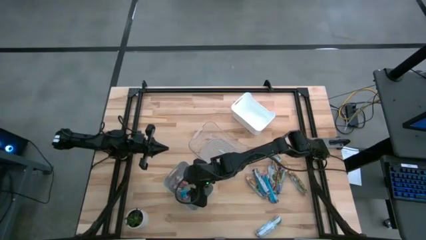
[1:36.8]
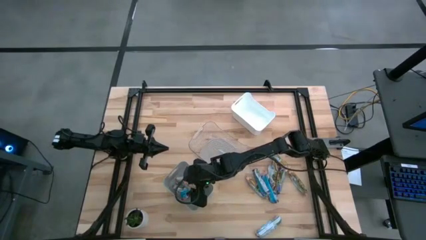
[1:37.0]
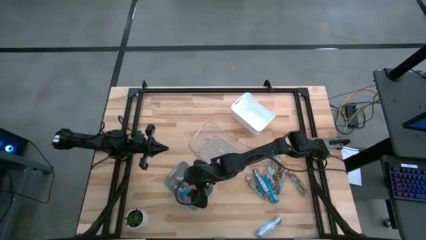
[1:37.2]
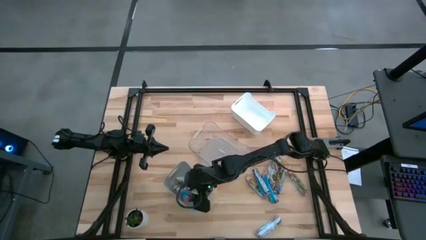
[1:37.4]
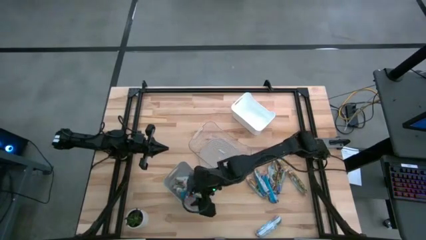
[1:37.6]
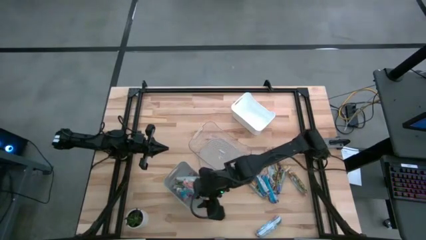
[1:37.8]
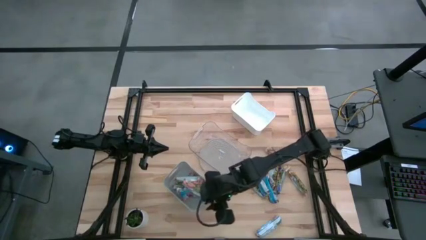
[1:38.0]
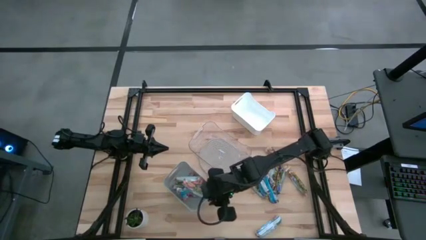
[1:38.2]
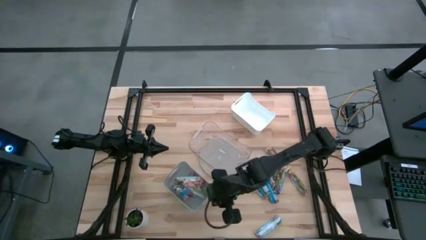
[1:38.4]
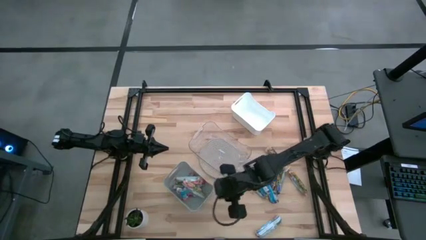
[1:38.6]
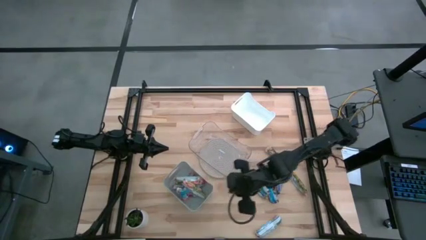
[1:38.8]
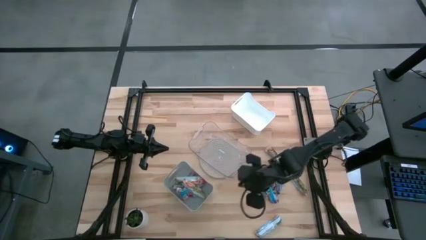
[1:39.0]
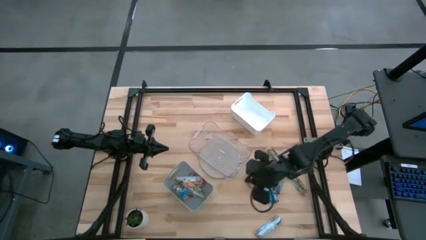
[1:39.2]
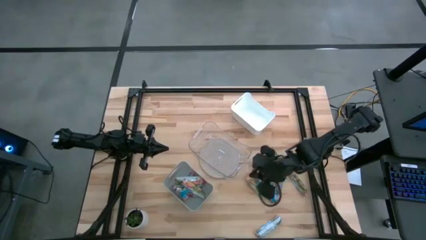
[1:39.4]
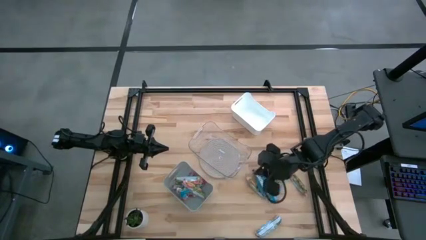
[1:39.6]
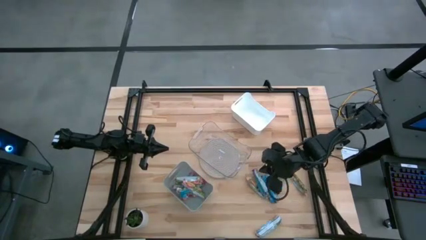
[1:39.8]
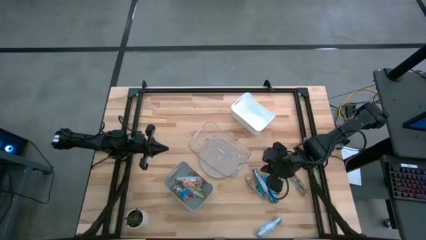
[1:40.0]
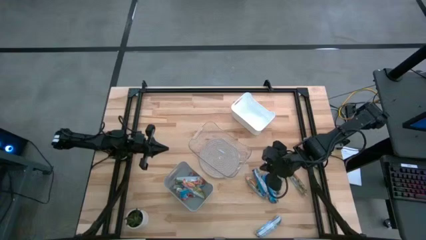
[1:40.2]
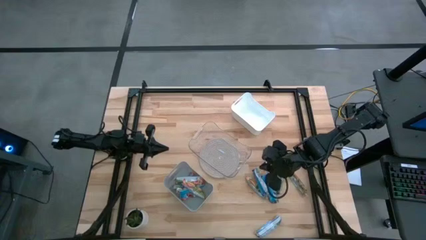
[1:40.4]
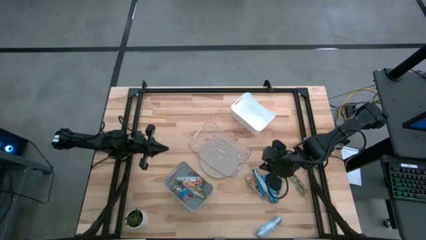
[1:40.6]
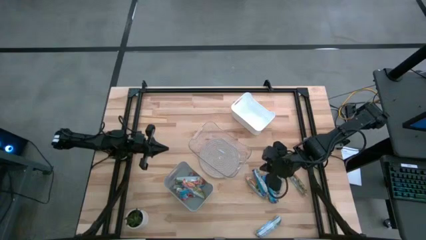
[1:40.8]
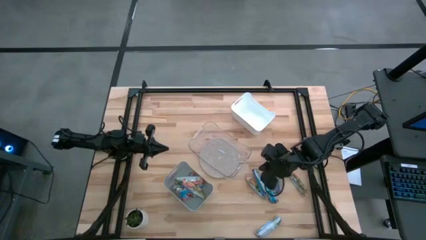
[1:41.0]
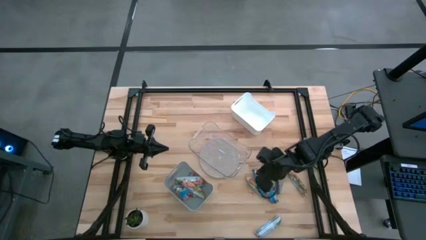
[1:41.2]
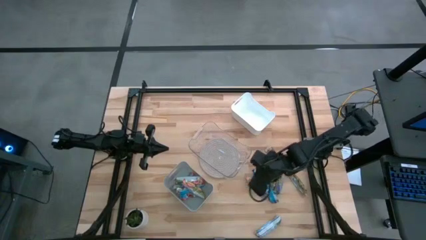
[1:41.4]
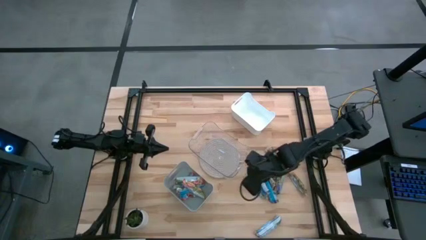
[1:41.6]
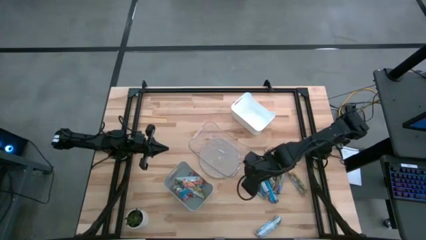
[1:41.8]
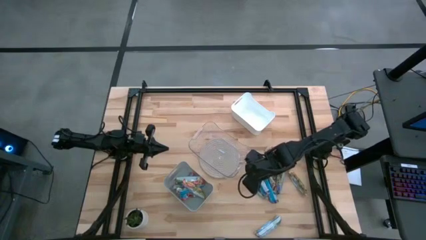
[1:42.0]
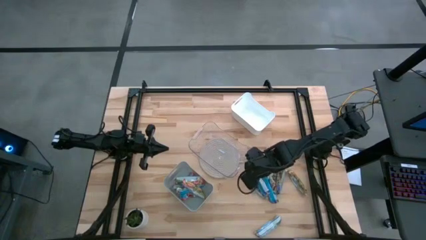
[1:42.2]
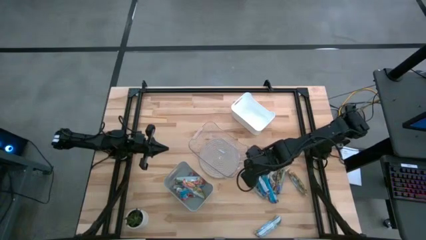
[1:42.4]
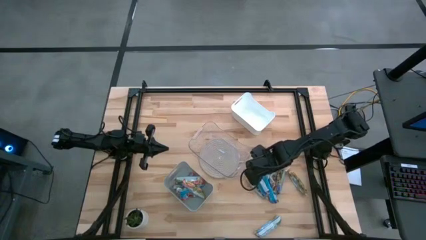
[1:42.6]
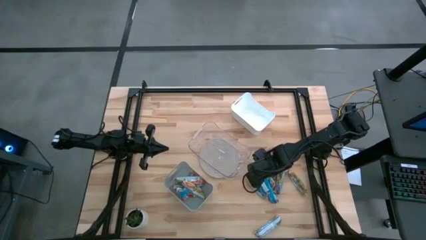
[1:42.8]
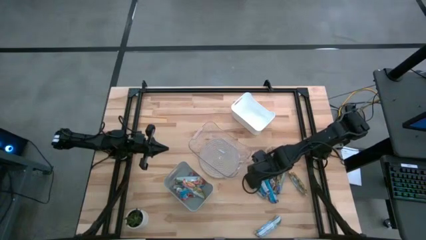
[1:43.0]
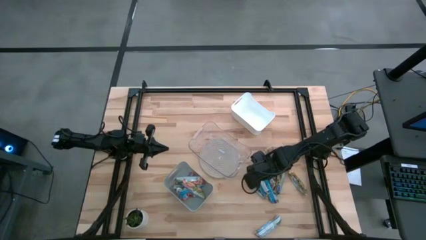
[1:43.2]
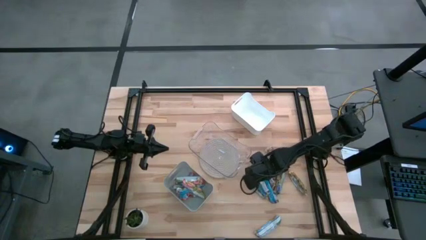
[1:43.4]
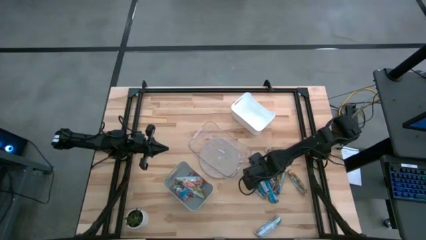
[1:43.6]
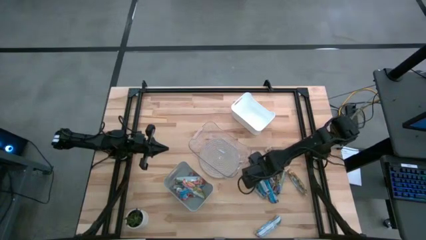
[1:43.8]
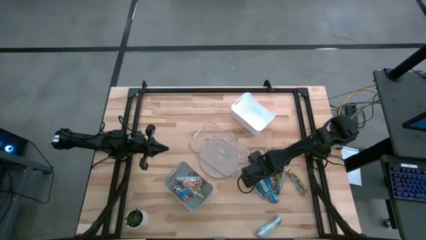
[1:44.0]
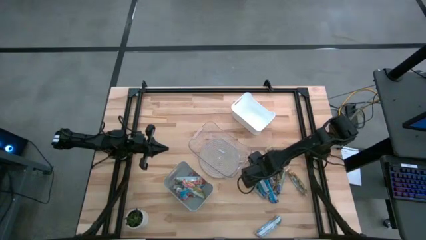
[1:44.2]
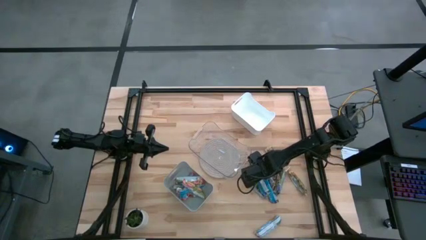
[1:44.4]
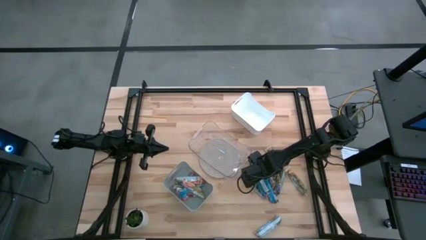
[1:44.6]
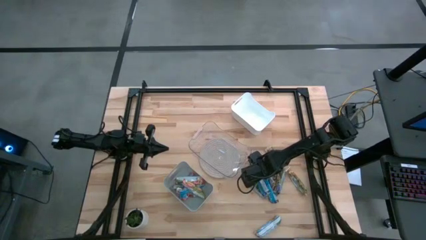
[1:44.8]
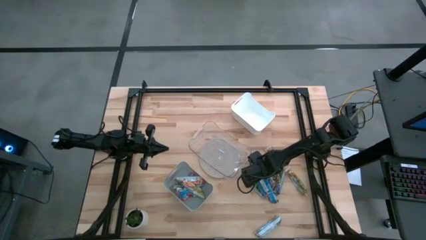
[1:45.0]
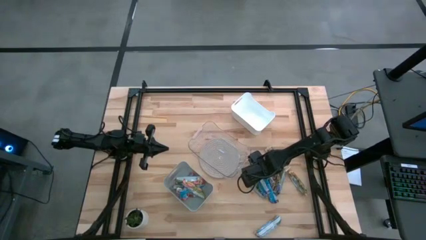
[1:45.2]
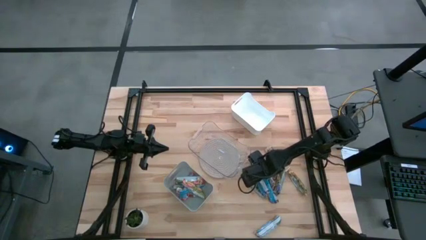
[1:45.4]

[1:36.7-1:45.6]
Task: Pick and place Granola Bars by type
Put the blue granola bar into the transparent bin

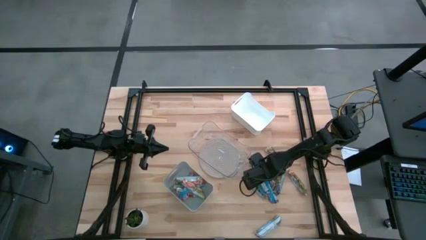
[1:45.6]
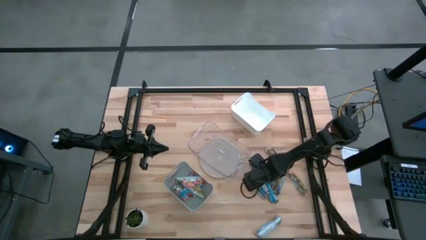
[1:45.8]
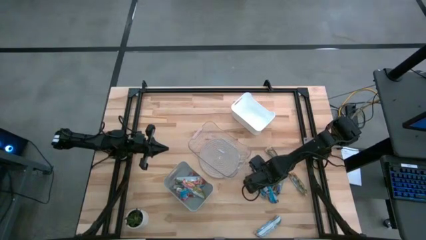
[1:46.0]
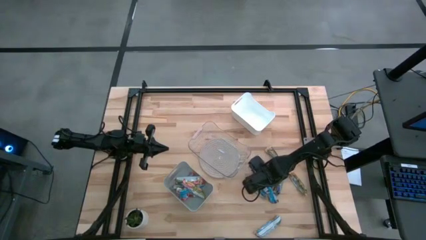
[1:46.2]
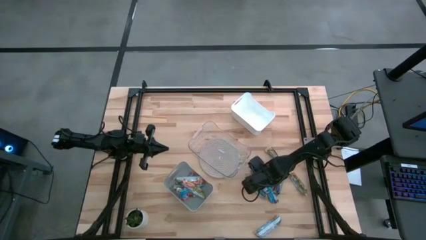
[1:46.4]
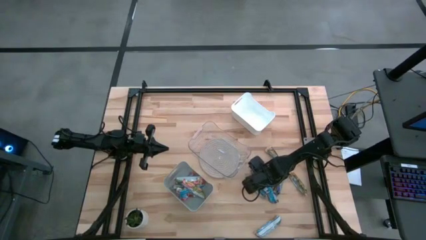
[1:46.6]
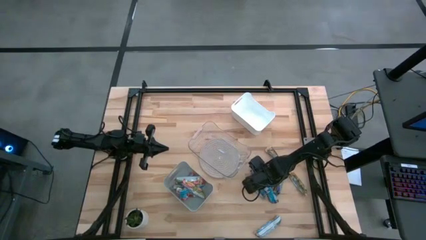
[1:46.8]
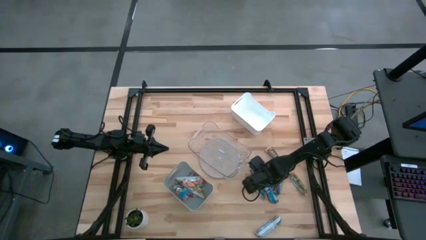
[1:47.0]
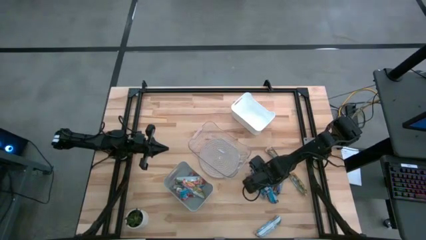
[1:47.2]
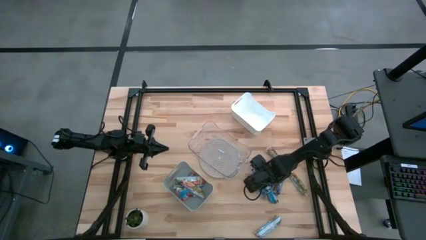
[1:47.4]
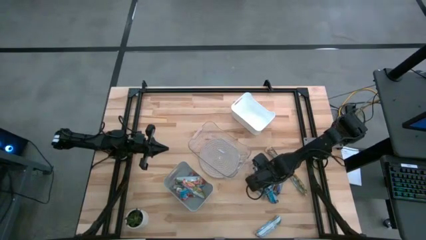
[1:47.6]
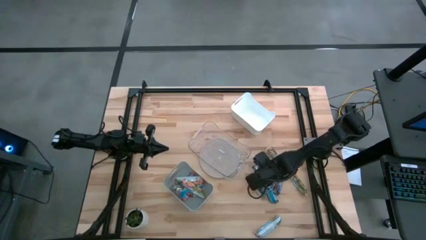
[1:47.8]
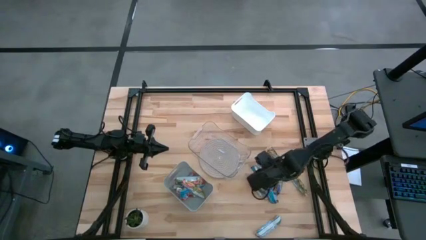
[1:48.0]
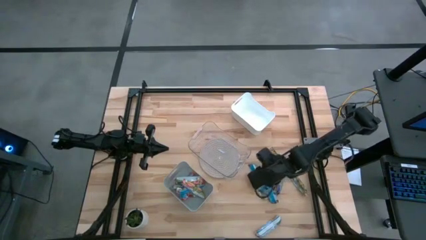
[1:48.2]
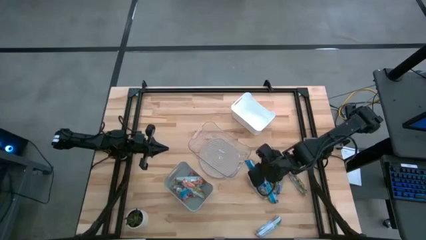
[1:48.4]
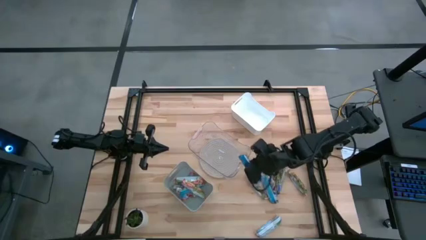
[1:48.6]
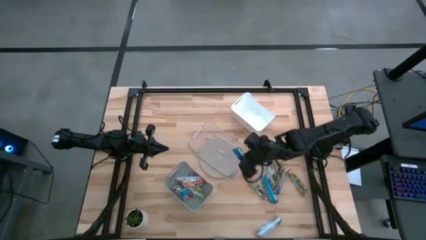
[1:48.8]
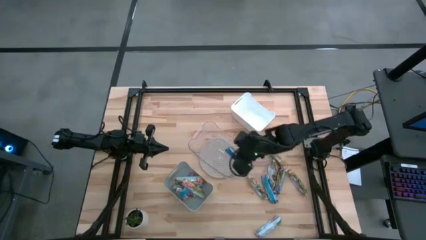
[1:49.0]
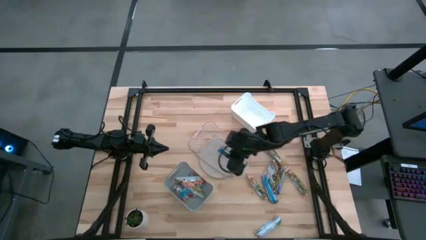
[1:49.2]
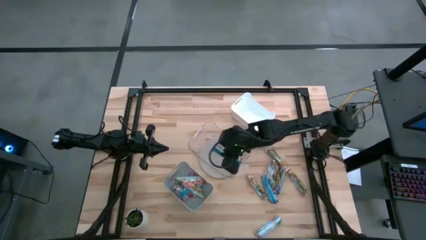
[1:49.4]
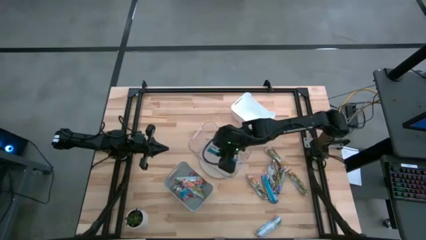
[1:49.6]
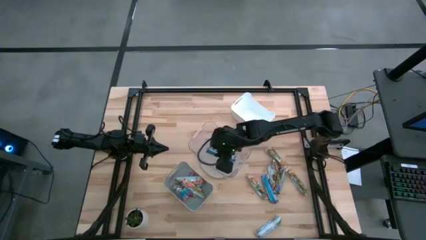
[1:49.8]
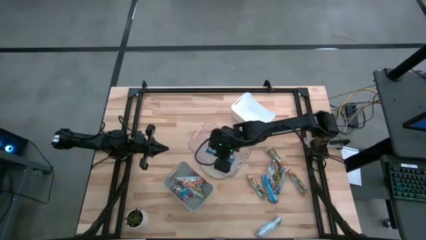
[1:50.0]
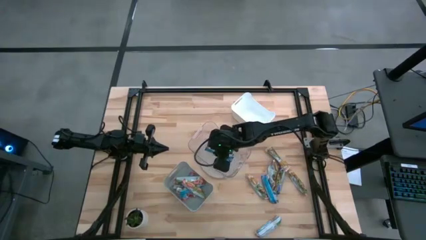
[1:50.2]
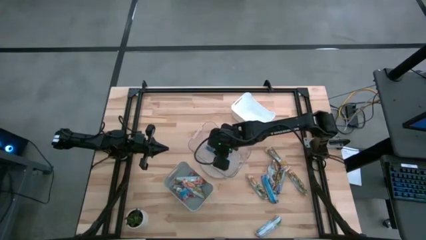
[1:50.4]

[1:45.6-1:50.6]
Put the blue granola bar into the transparent bin

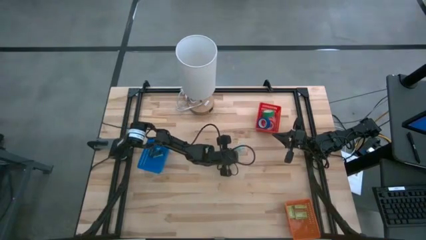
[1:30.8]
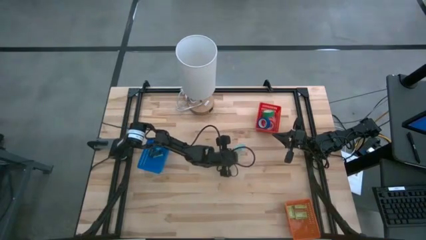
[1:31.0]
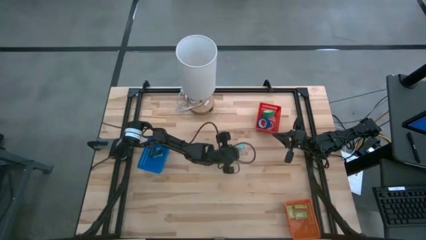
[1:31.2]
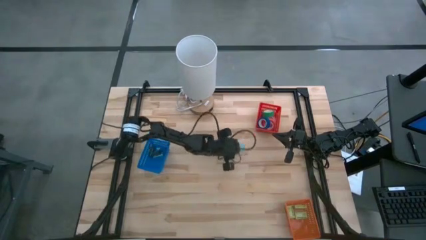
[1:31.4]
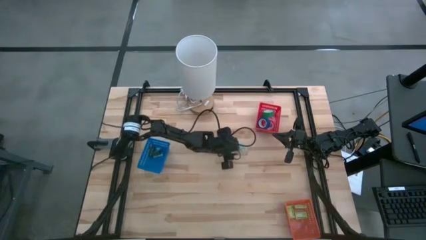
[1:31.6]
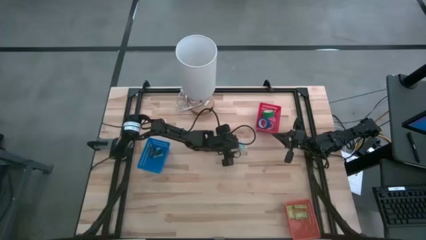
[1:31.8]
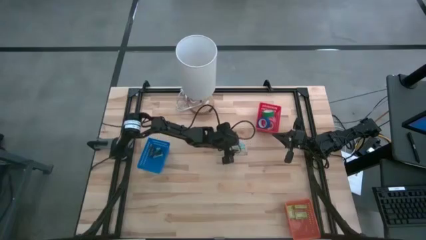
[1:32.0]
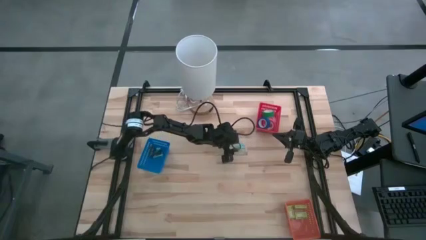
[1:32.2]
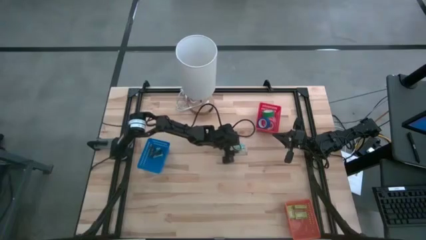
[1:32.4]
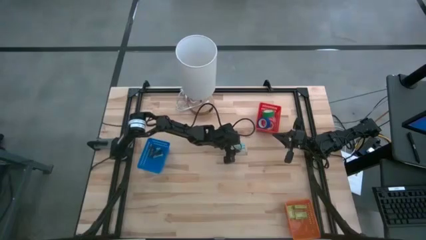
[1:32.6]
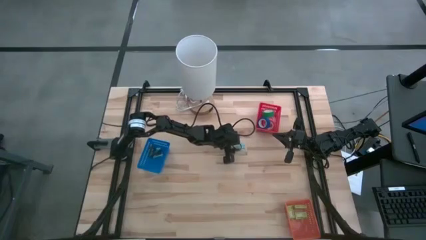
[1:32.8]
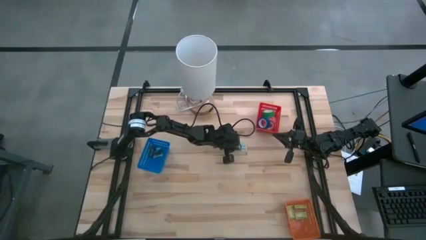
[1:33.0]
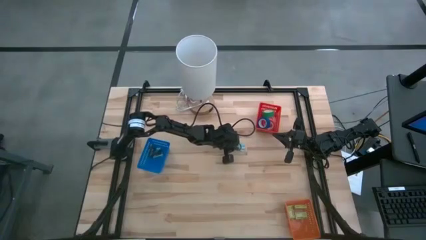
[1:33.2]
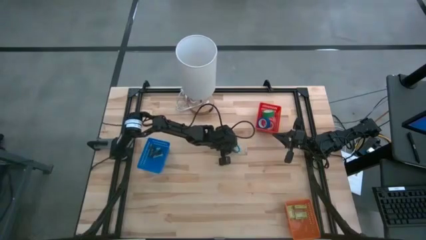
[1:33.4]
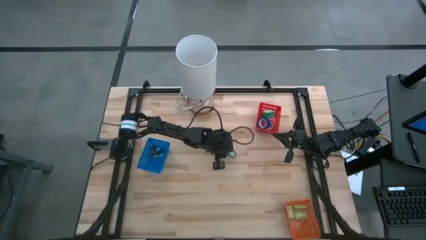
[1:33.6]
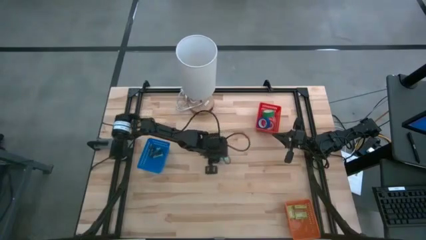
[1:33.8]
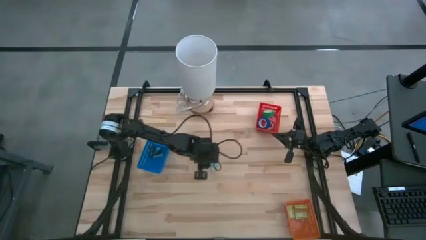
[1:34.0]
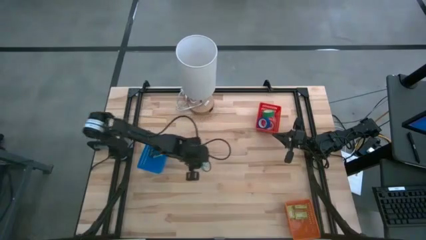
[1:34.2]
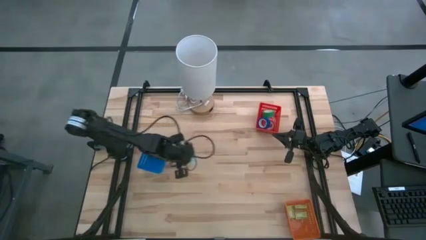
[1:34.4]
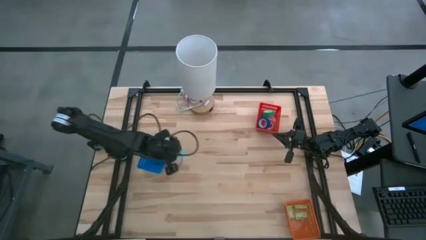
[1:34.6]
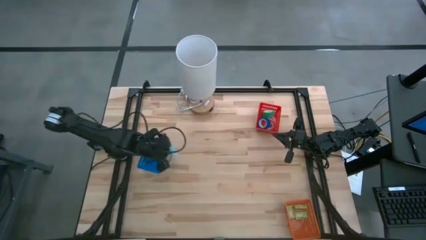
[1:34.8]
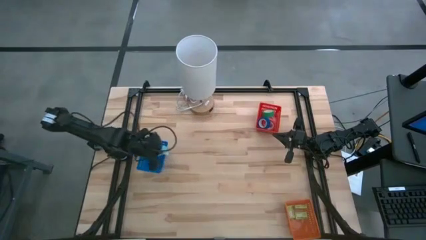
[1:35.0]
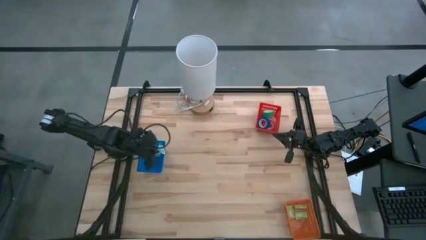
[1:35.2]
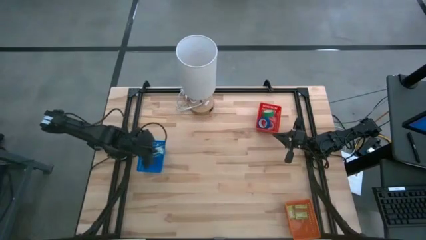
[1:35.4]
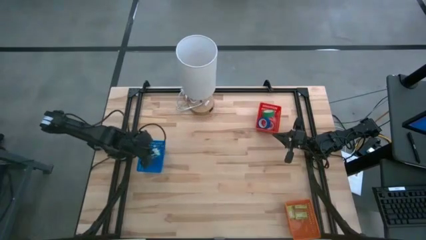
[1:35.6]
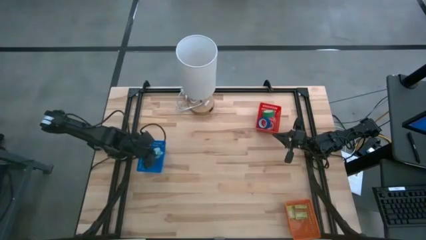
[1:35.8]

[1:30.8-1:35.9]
Task: Pick and place Stapler, Stapler remover, tape
Put the light blue staple remover into the blue bin
